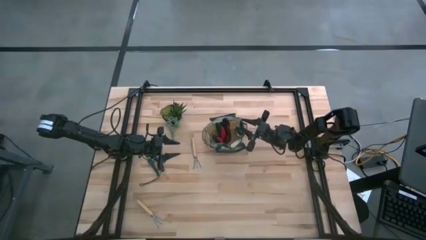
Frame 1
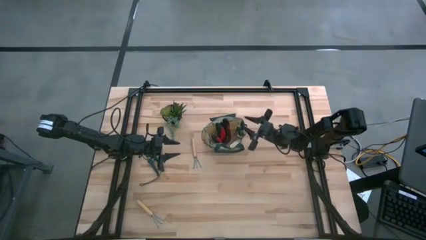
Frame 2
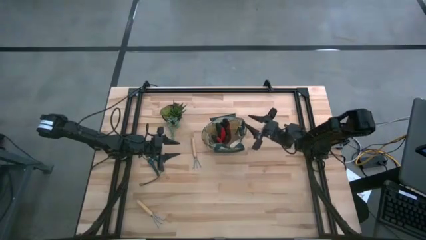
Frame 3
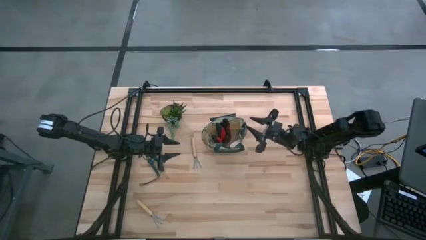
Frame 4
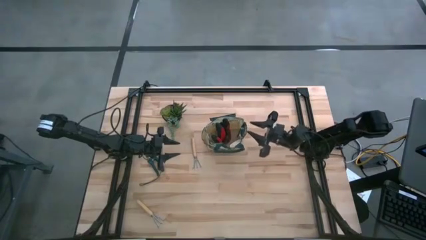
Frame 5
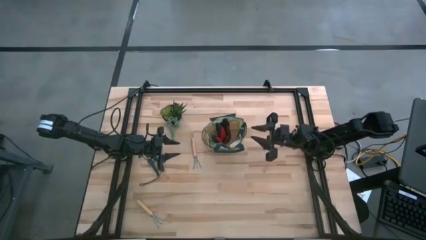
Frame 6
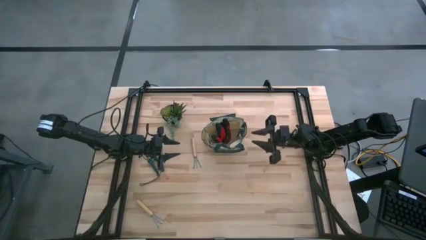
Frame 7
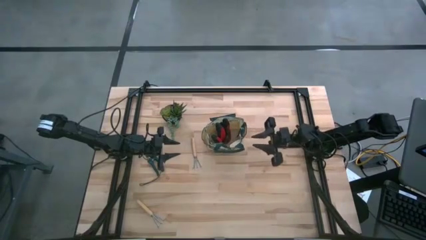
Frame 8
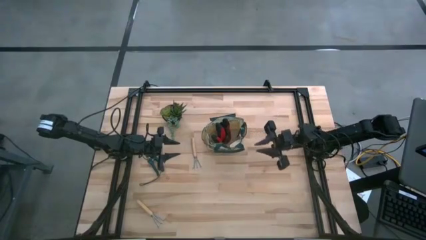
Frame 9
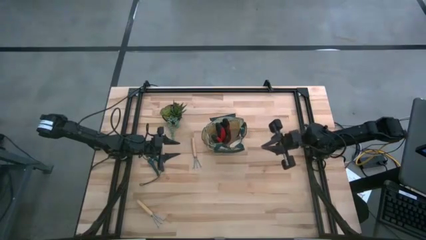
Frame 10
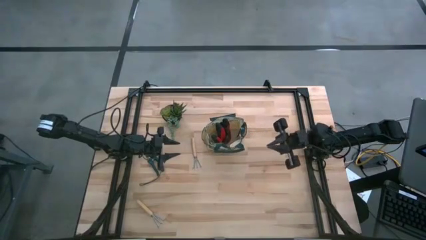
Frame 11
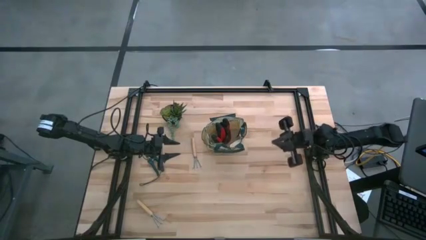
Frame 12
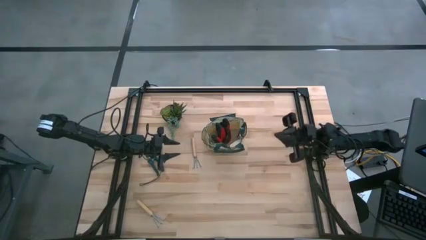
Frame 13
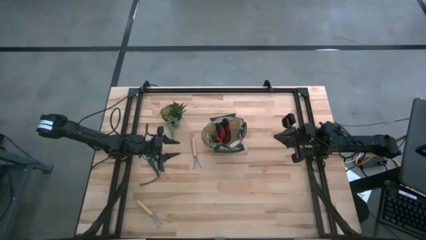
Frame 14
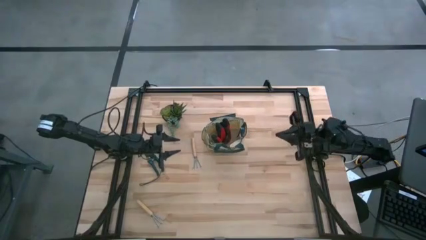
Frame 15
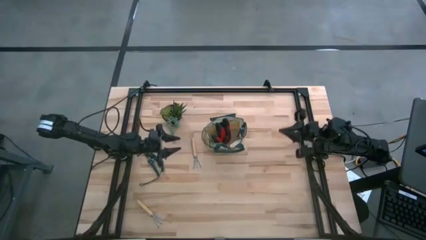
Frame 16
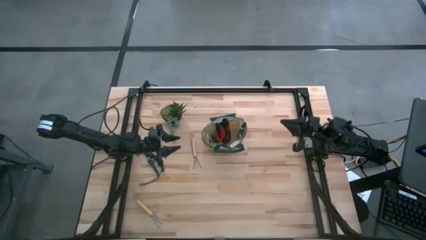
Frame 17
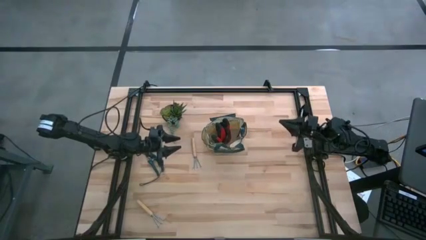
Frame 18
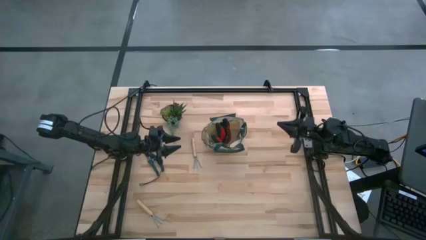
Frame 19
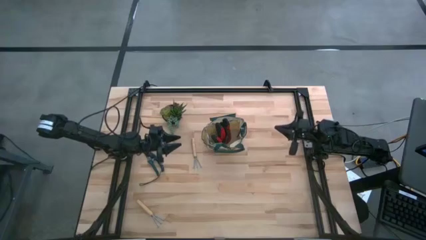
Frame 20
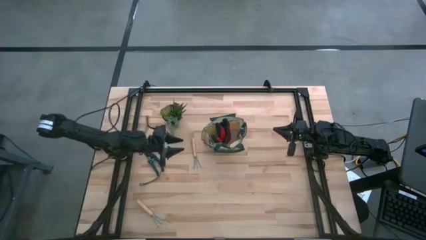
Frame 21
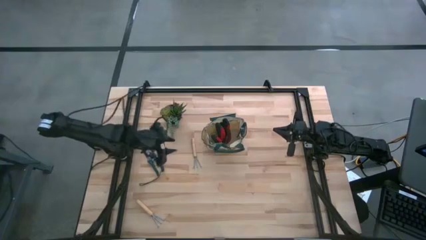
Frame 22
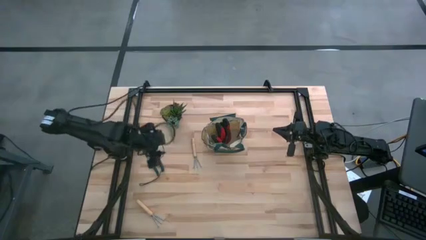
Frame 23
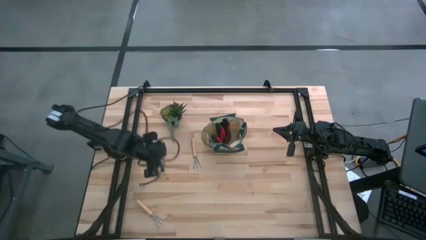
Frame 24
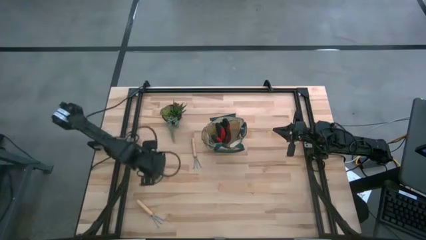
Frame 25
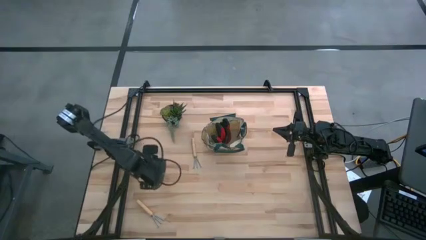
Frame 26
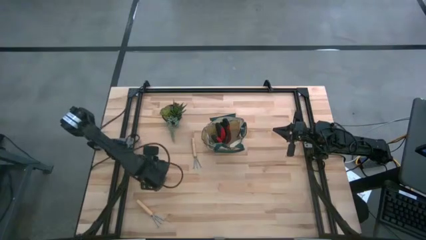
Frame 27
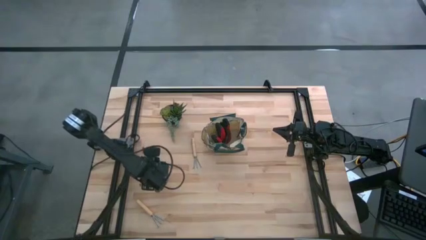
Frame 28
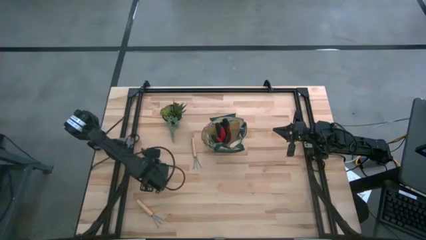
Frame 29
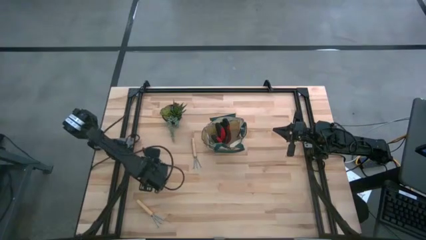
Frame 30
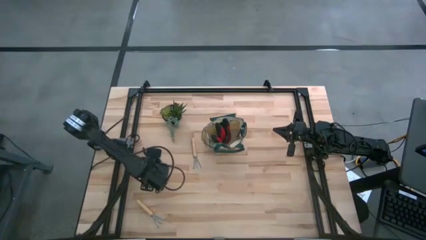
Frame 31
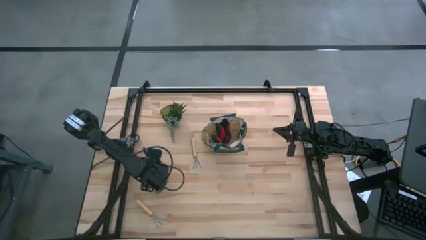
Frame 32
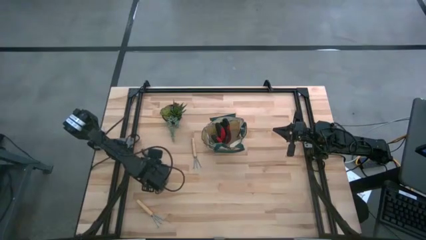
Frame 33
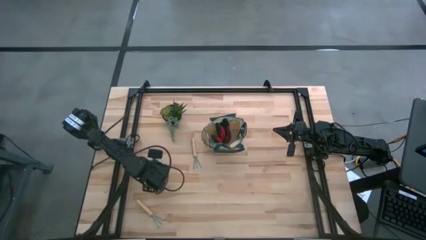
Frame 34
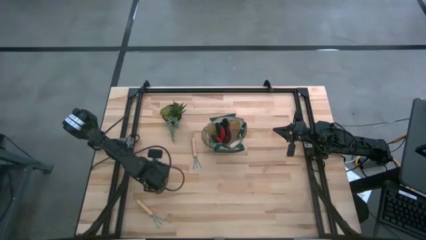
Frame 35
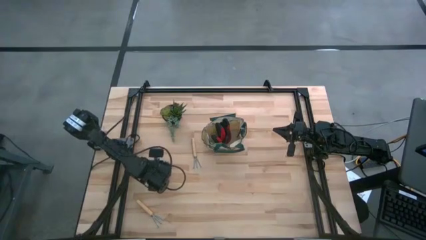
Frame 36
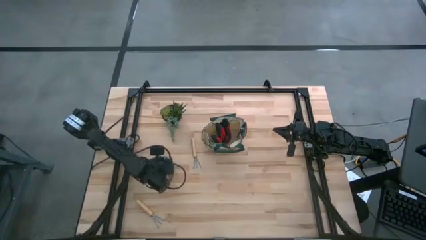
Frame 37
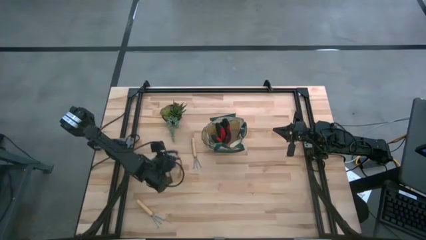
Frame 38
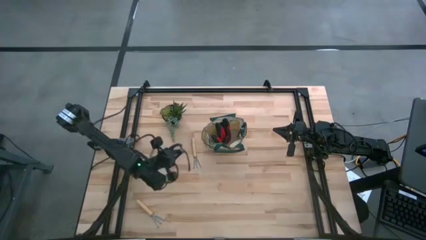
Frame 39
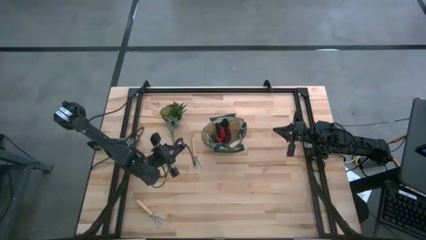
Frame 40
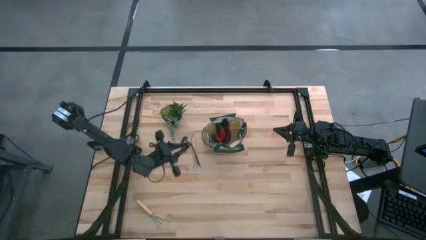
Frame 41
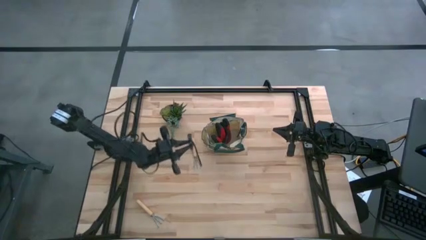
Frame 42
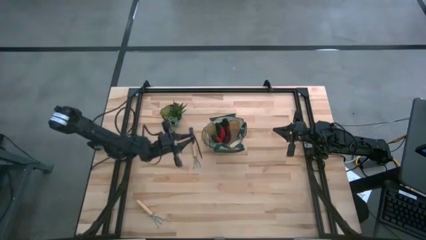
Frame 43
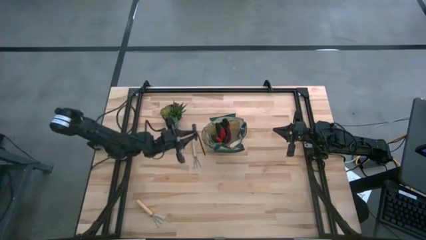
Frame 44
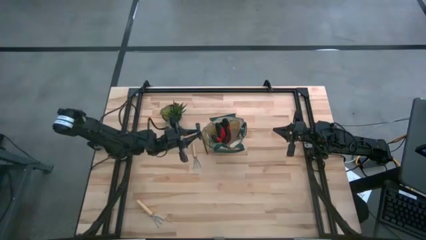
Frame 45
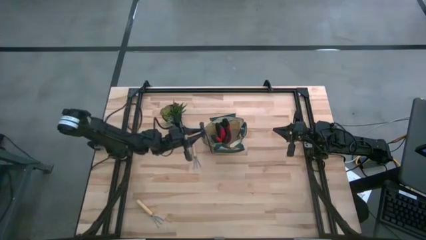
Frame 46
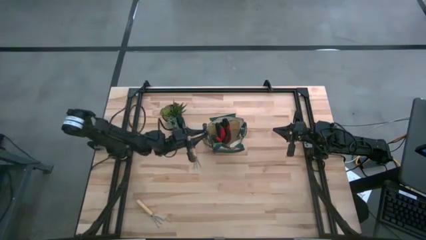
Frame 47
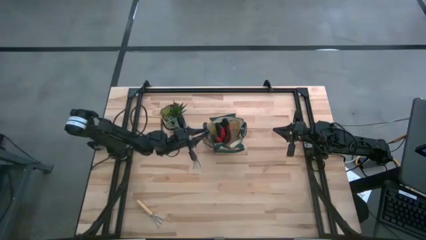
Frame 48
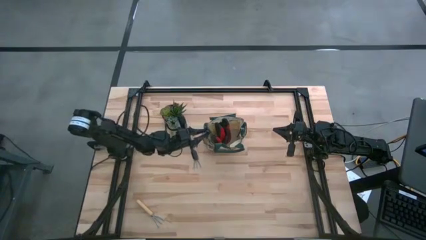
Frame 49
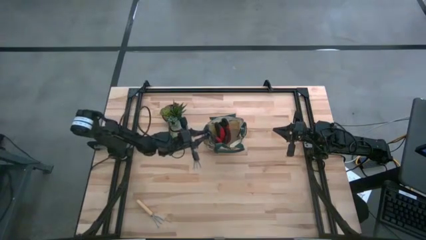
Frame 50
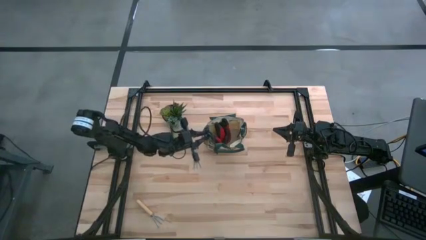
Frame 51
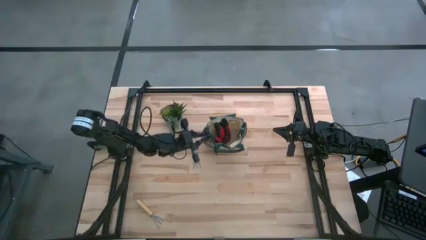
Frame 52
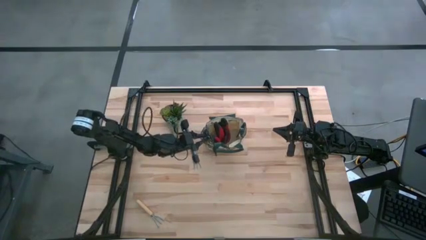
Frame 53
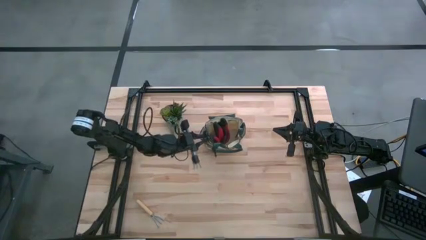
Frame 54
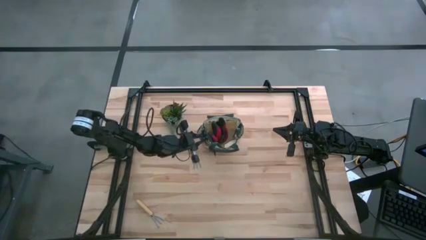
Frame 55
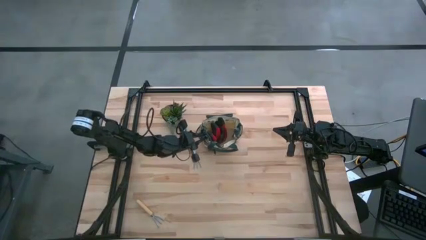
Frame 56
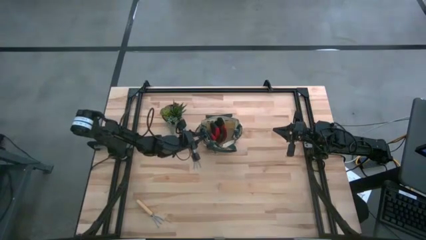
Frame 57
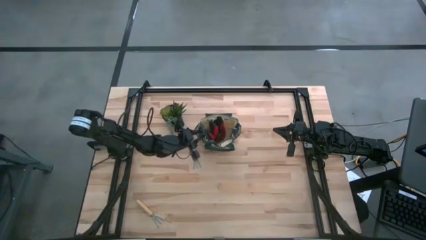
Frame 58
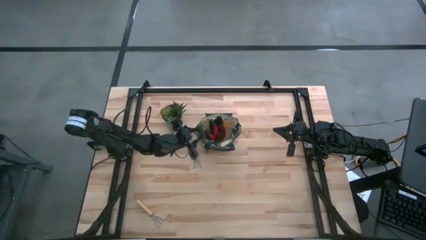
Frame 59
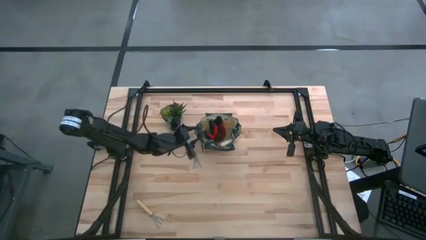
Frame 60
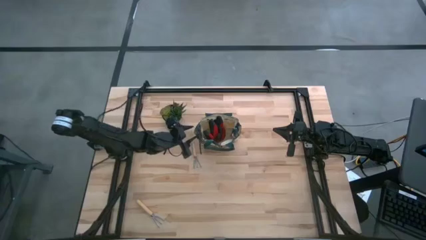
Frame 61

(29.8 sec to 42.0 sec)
Task: Pick & Place Garden tools in Gardening bag
Put the green shear scissors into the white gardening bag

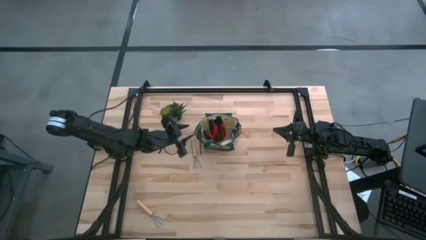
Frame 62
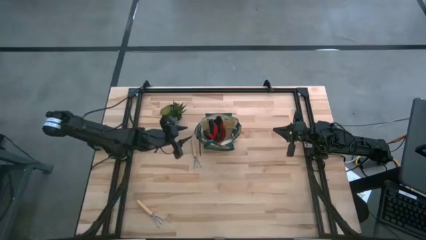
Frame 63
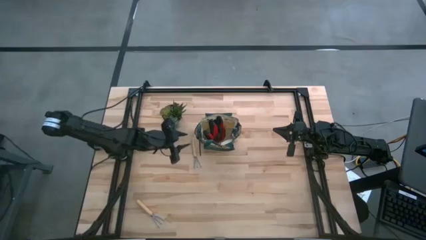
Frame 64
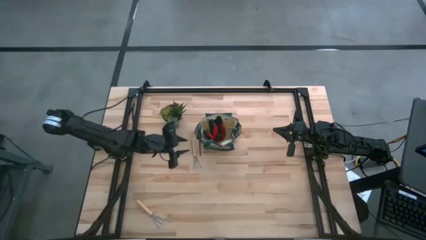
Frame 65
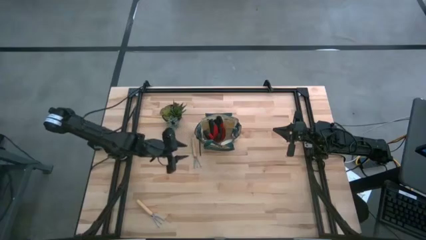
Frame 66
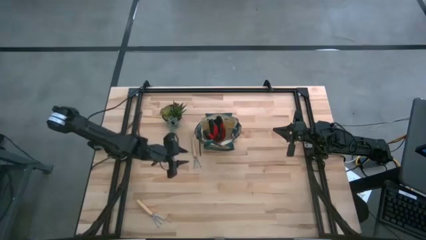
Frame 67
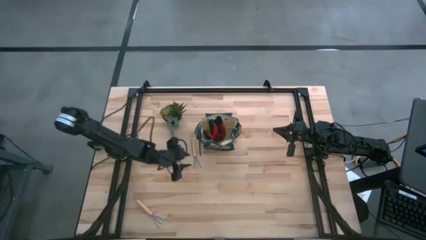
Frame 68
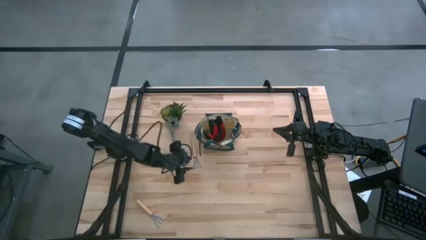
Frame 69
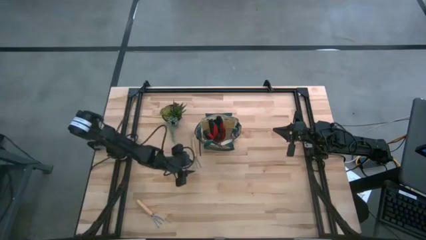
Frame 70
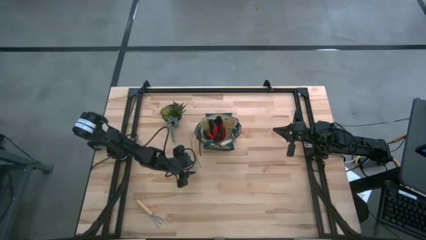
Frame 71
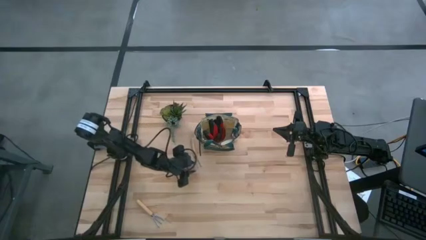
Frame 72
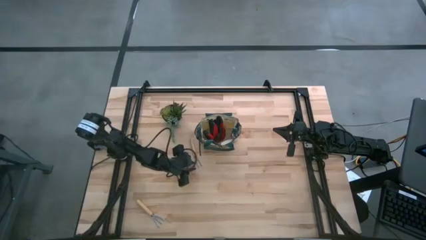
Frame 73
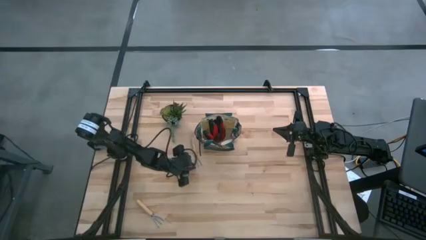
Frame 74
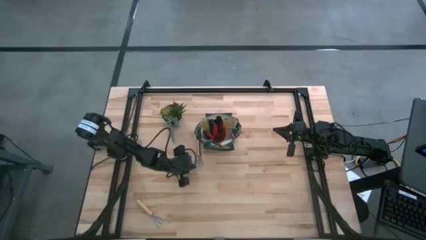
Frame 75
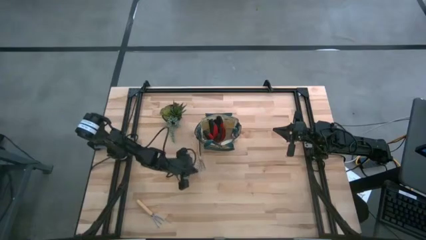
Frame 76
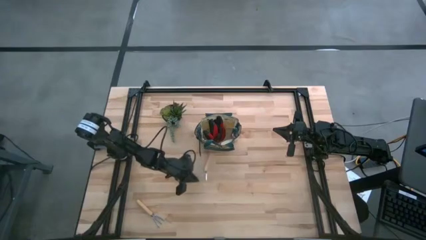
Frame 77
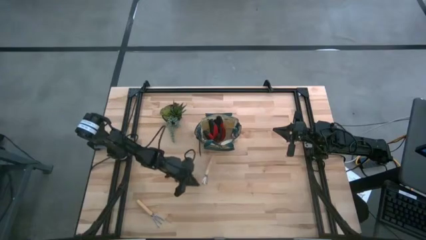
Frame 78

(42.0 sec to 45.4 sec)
Put the brown hand rake into the white gardening bag
